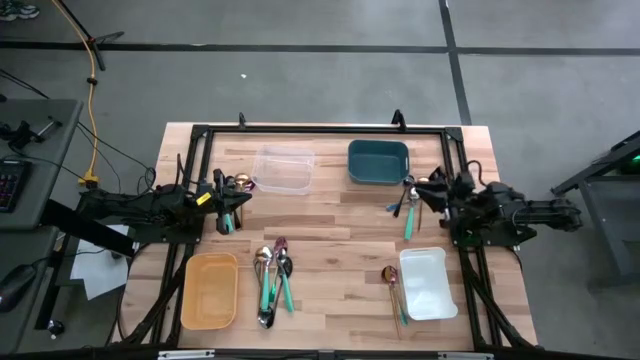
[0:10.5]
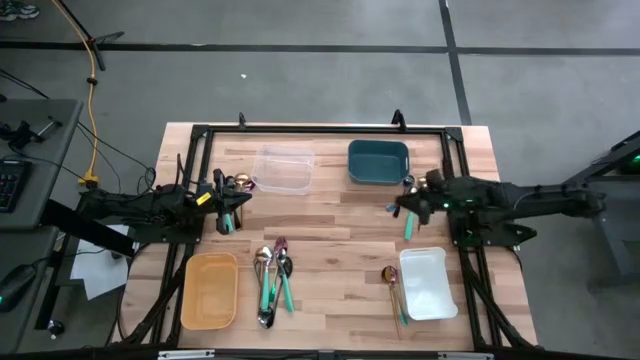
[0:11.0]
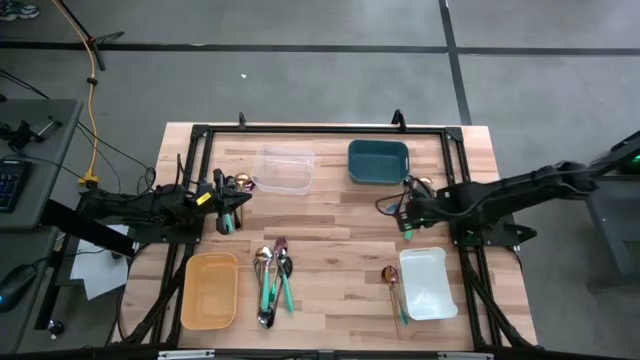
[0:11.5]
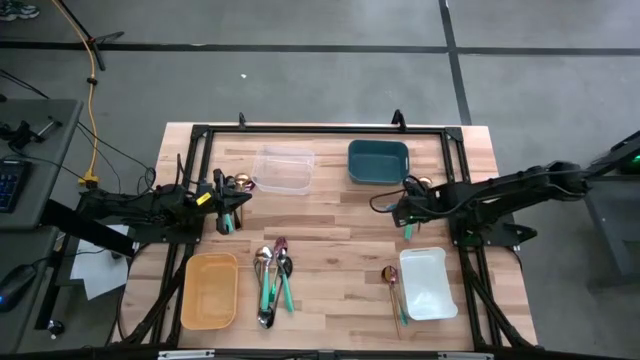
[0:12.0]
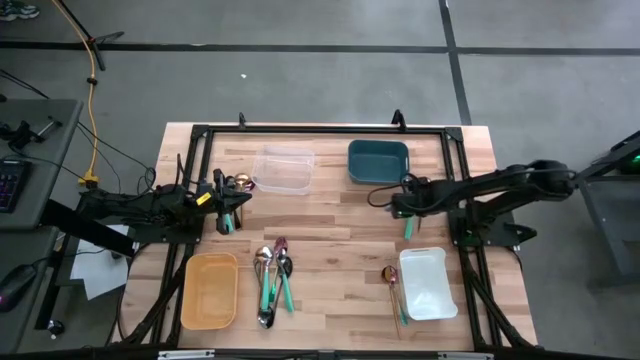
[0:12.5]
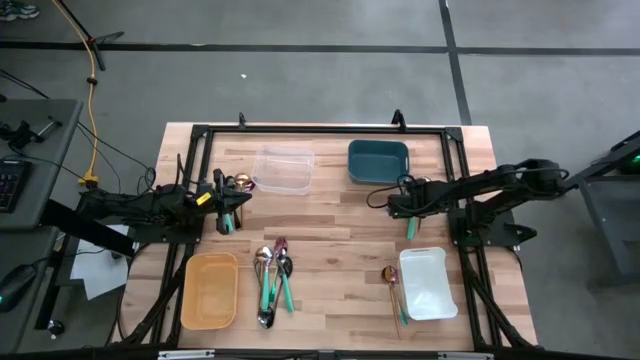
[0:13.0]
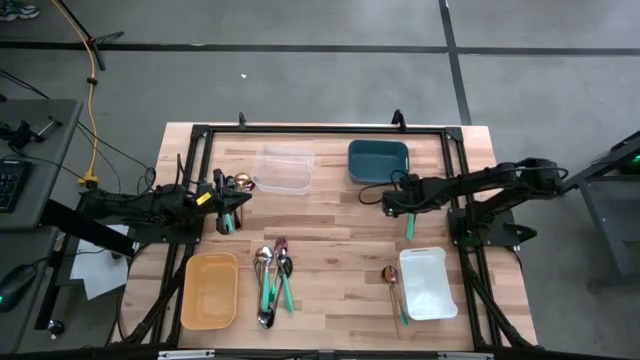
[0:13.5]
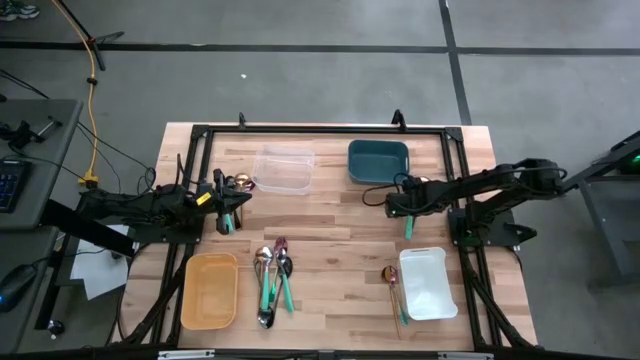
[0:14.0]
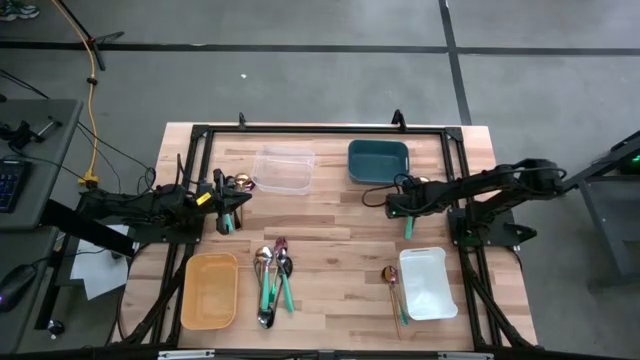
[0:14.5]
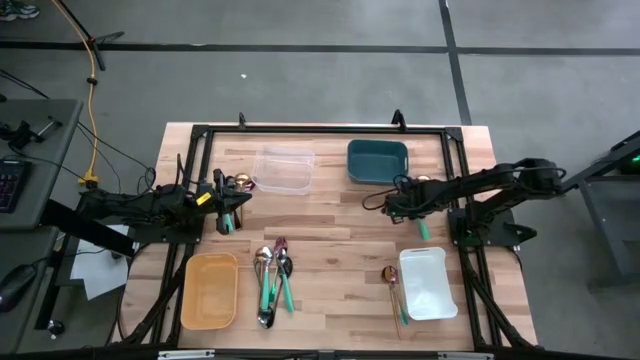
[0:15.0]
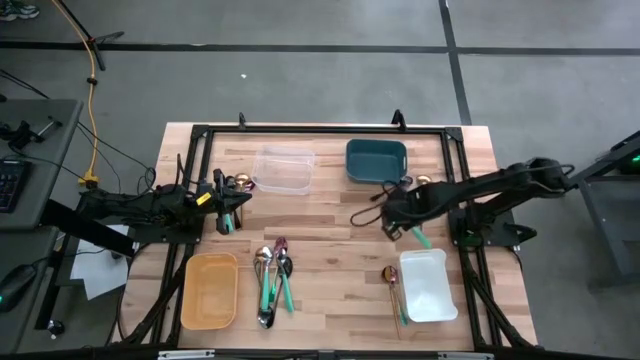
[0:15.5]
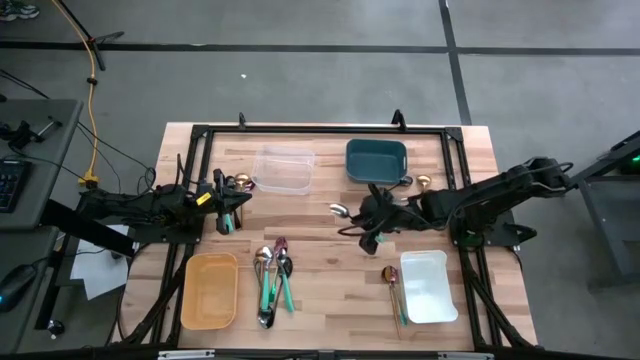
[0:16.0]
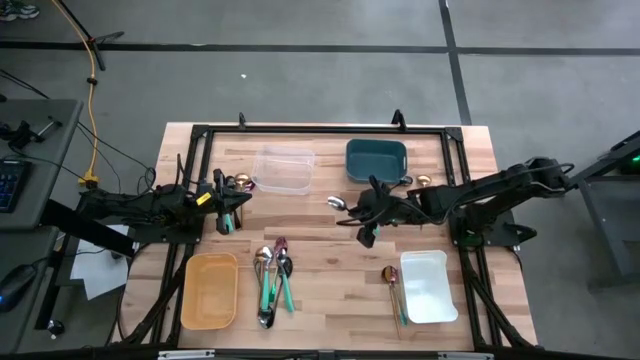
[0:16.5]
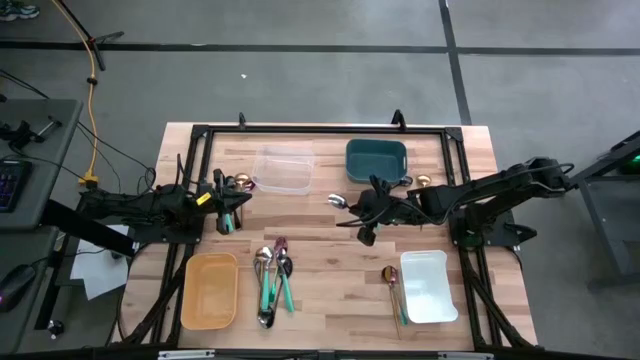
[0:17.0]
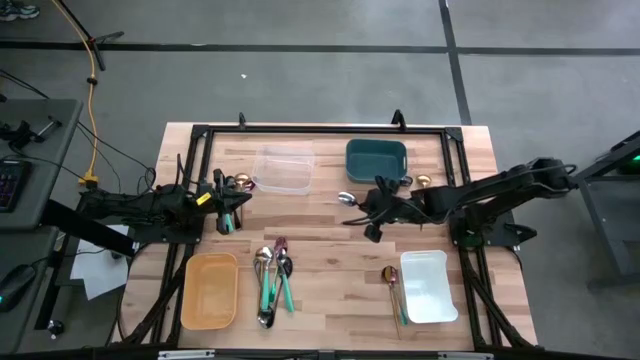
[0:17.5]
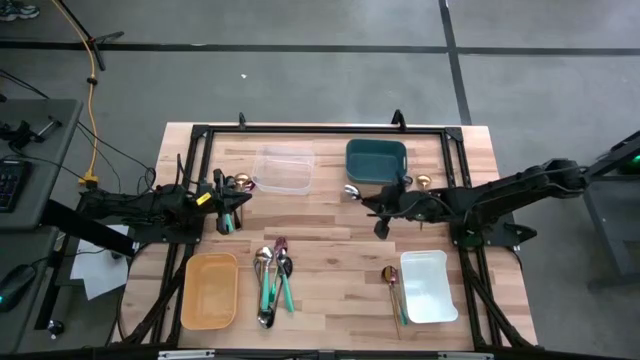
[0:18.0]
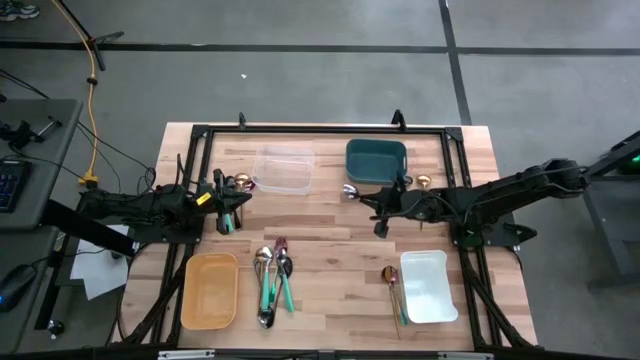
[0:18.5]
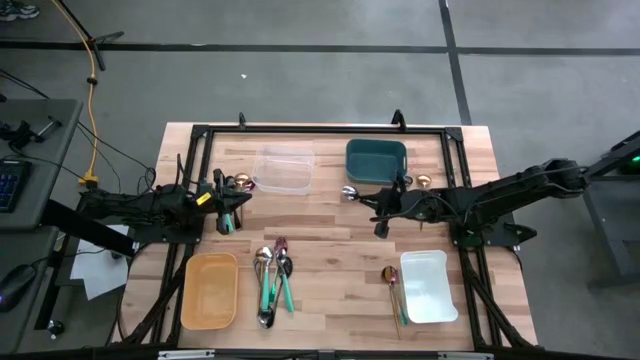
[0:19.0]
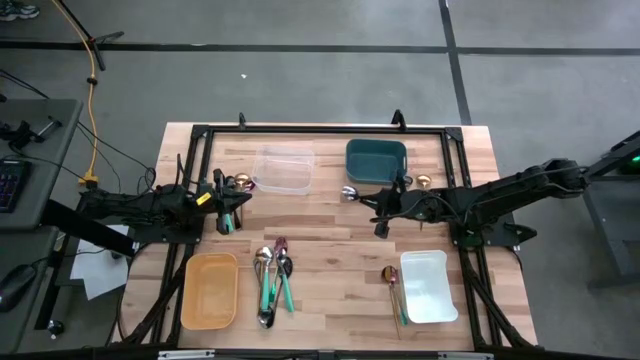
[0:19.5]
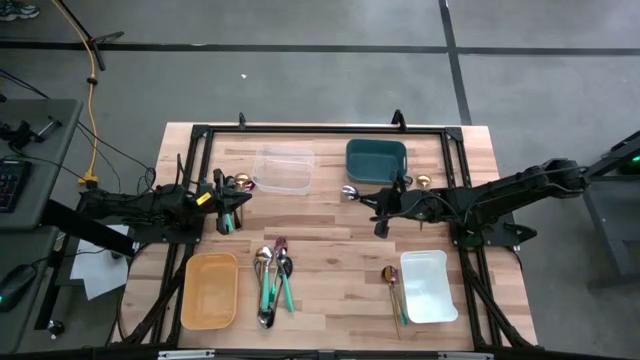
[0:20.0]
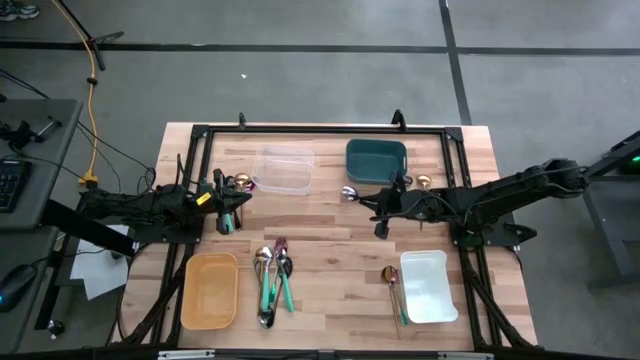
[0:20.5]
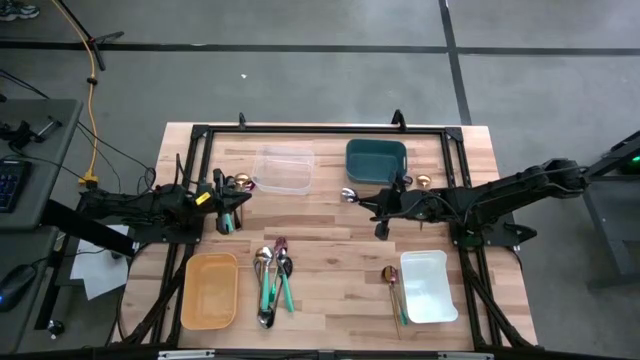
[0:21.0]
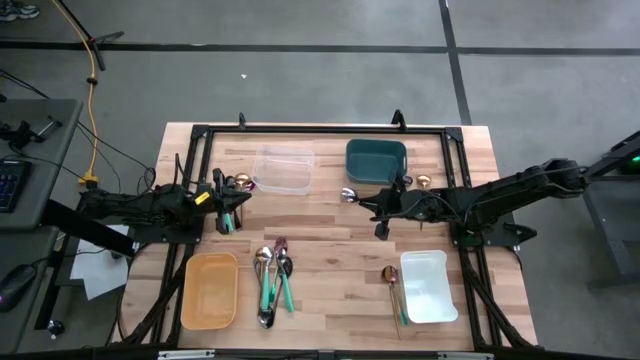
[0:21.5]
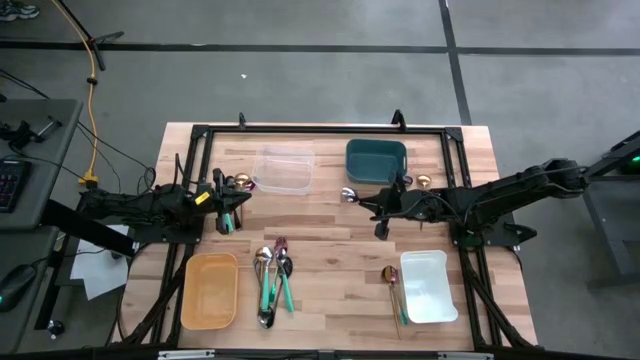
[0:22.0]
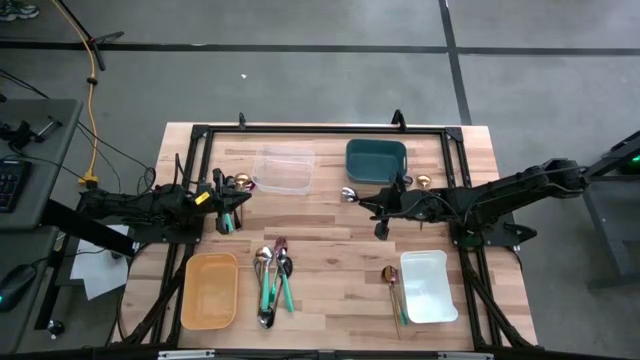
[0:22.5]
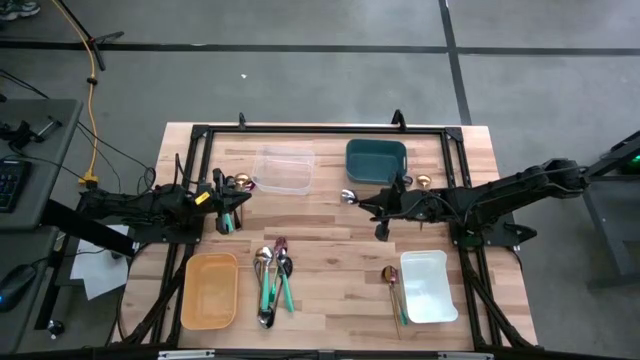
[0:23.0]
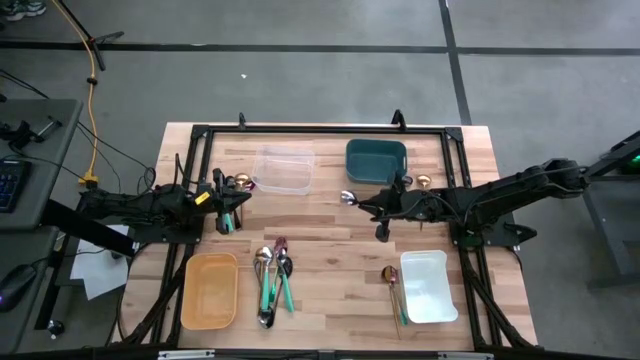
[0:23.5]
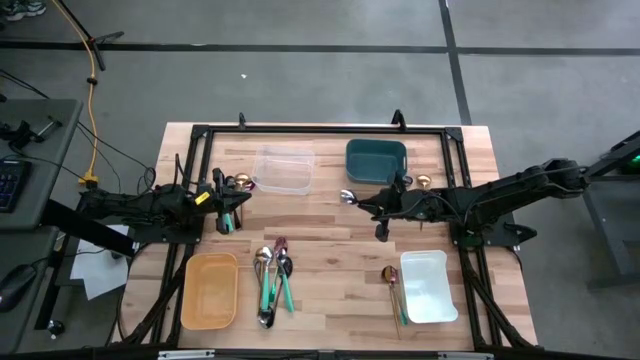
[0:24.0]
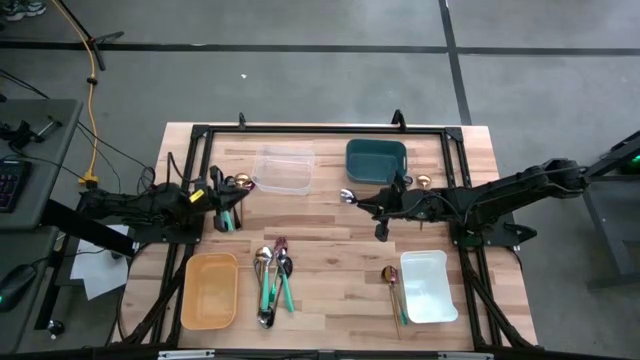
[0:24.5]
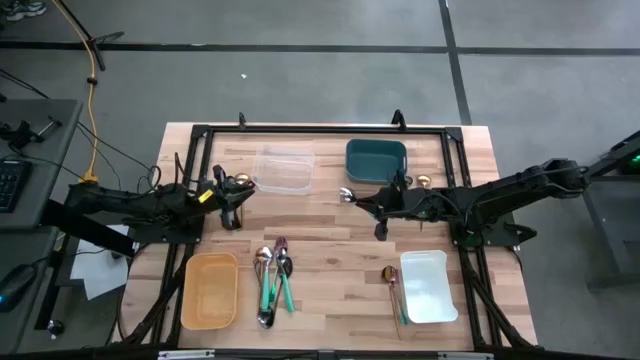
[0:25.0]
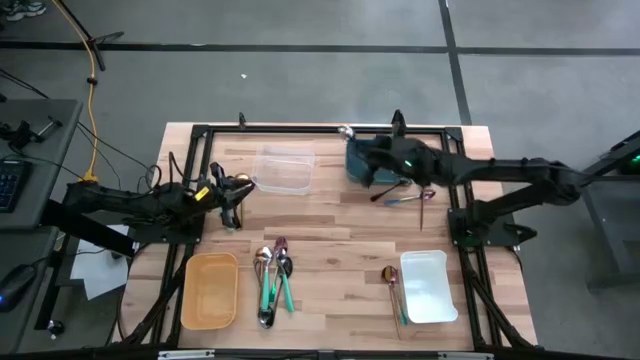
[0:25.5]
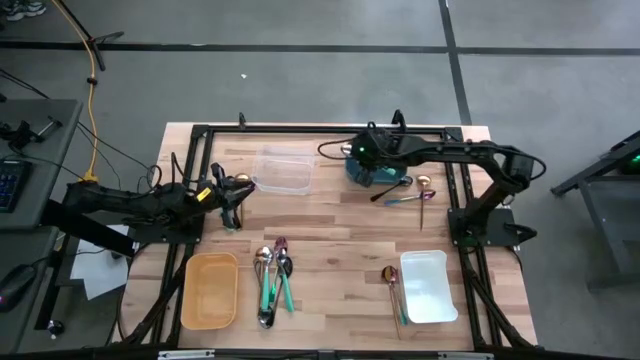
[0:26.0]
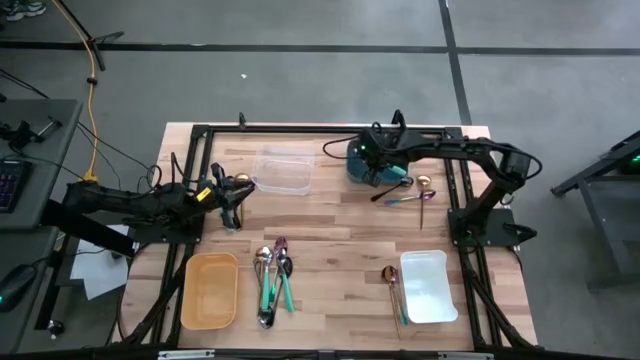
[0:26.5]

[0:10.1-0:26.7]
Task: Sort silverware by color (type)
Put the green spoon into the blue bin

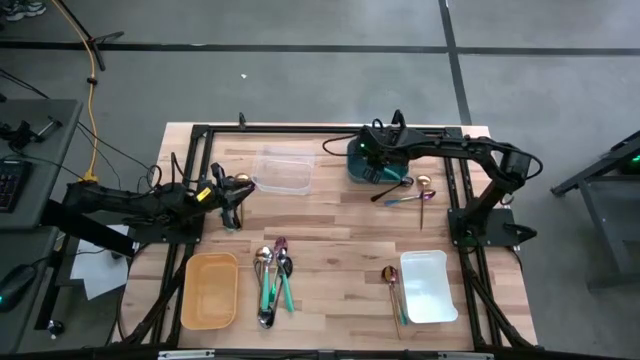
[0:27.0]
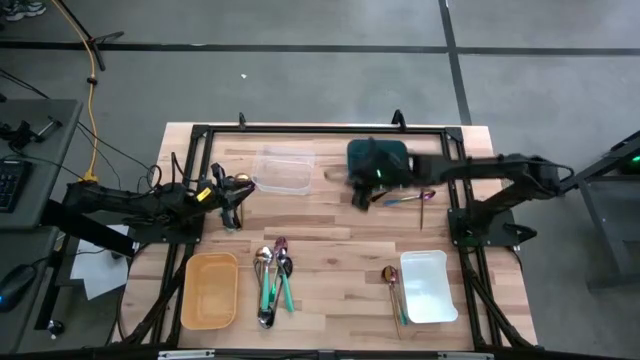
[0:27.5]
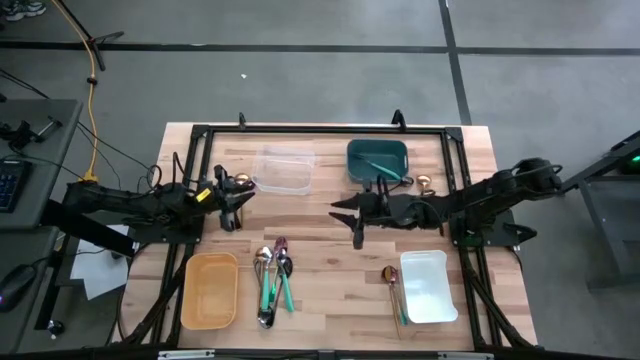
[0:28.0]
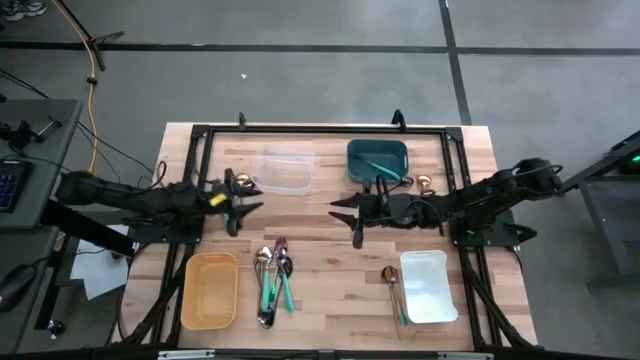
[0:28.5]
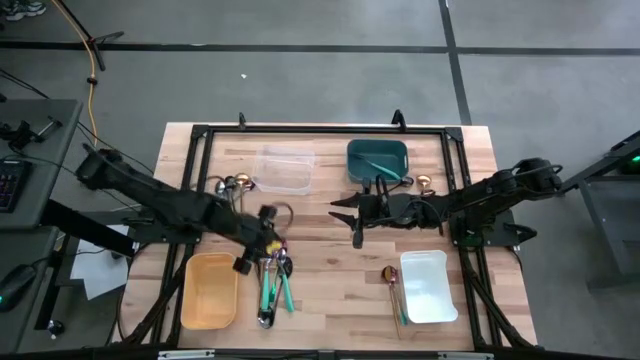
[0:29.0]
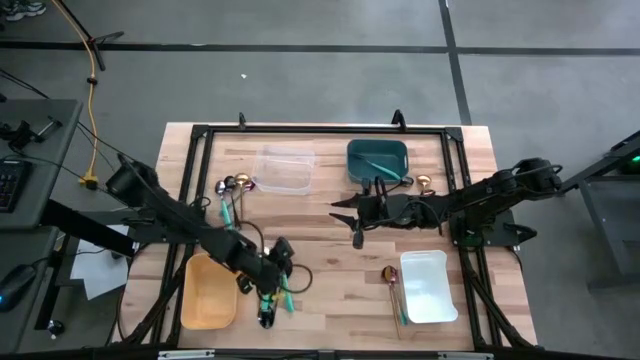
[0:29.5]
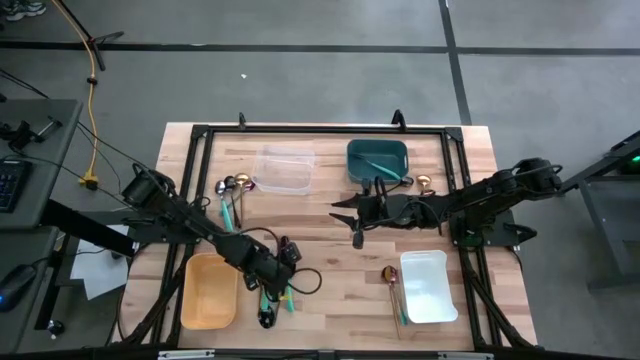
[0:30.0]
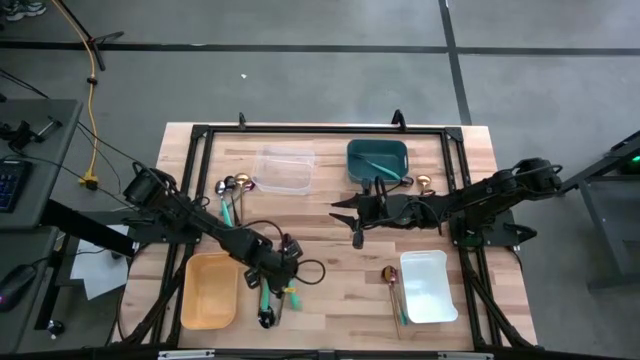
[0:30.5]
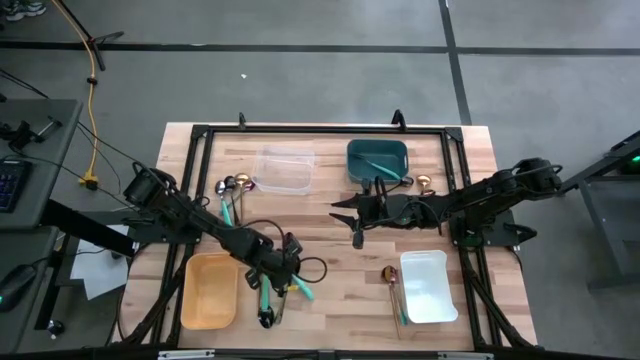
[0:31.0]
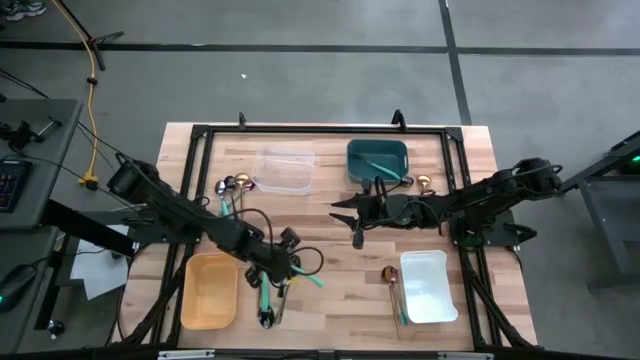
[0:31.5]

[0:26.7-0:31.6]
Put the green spoon into the blue bin
